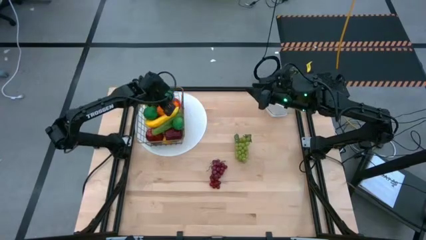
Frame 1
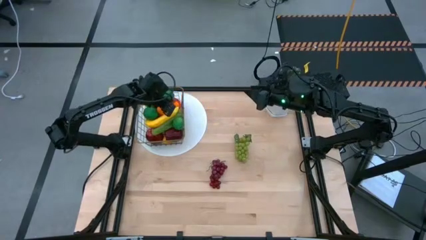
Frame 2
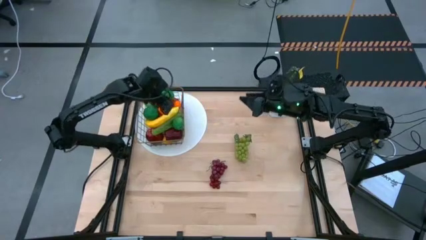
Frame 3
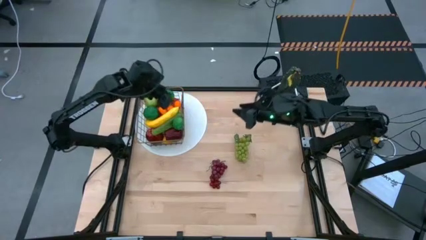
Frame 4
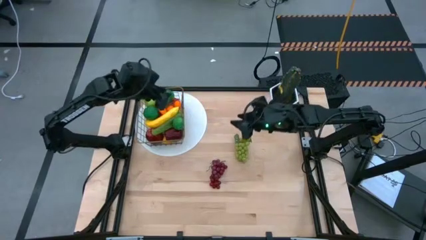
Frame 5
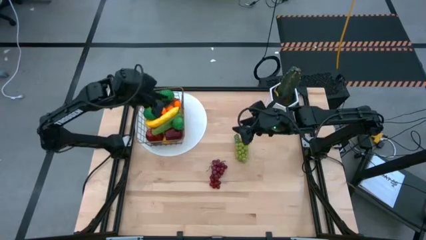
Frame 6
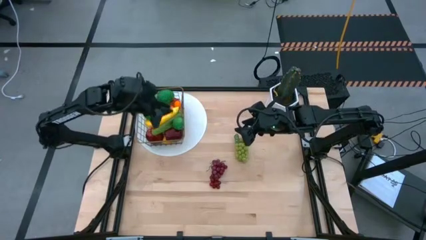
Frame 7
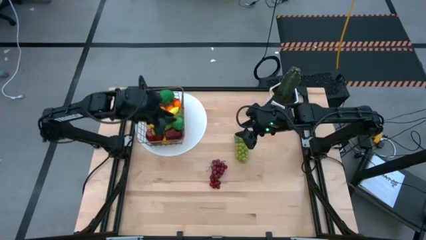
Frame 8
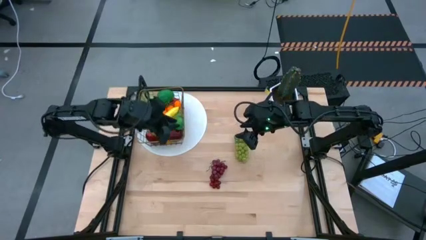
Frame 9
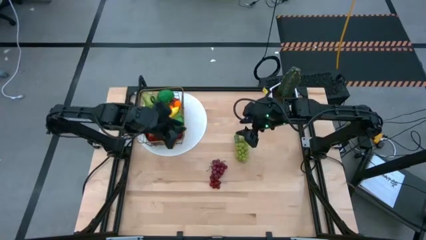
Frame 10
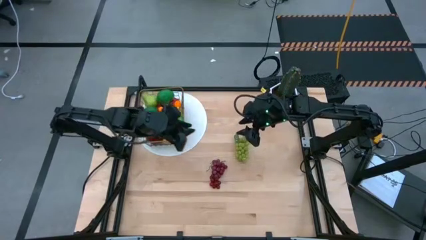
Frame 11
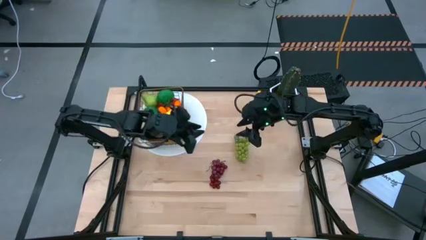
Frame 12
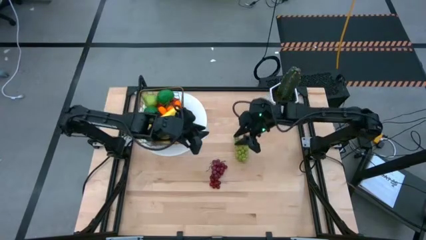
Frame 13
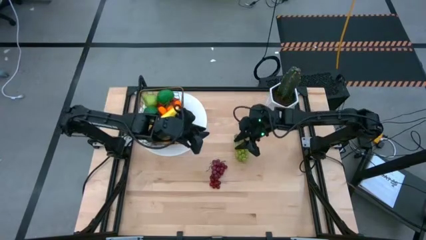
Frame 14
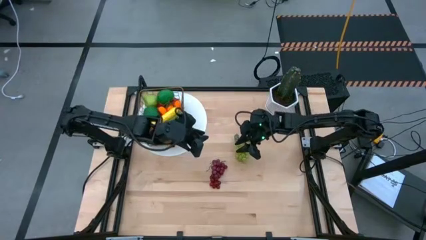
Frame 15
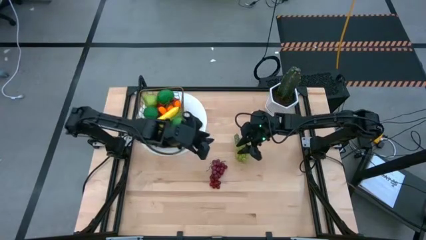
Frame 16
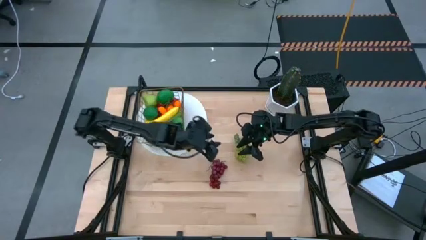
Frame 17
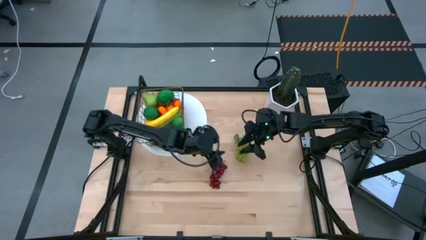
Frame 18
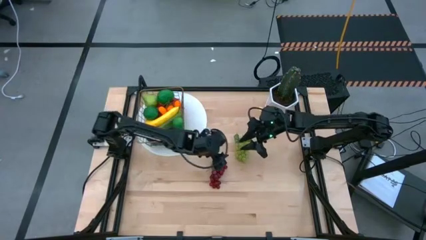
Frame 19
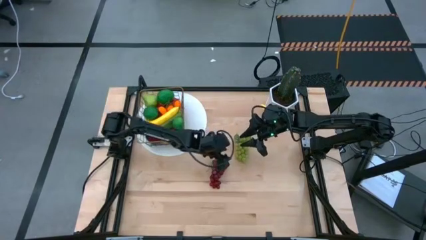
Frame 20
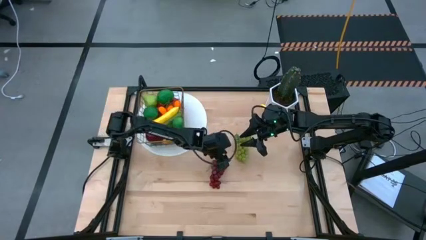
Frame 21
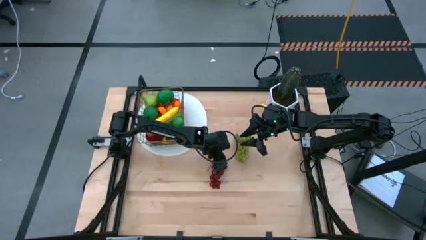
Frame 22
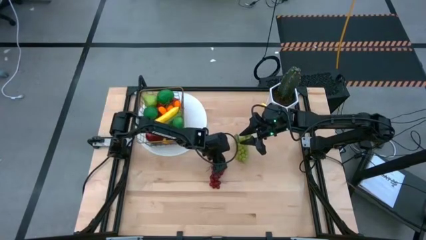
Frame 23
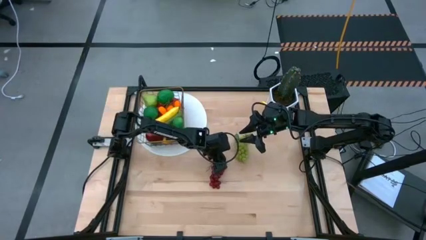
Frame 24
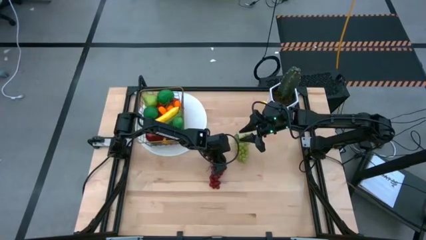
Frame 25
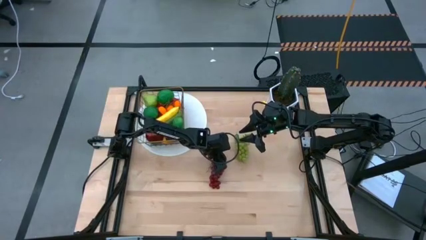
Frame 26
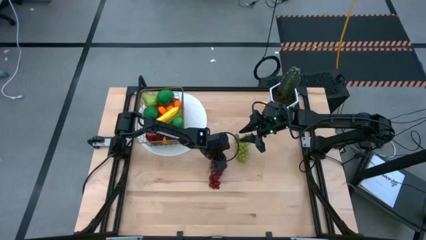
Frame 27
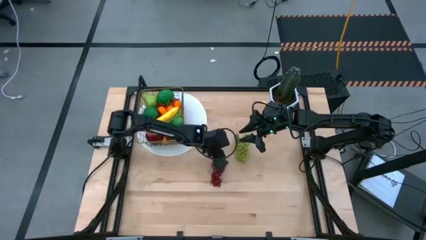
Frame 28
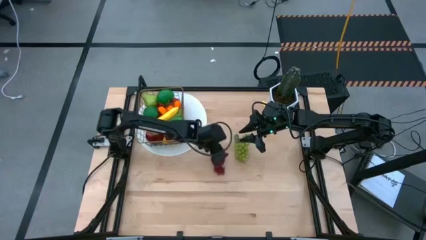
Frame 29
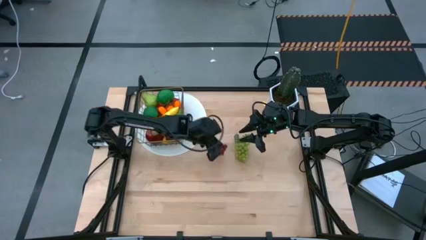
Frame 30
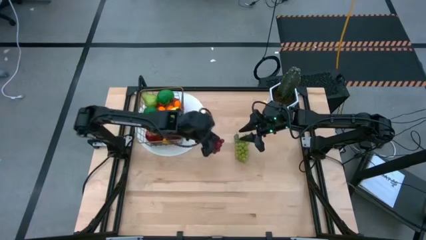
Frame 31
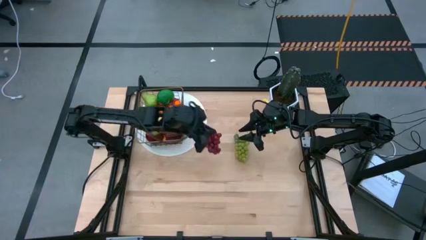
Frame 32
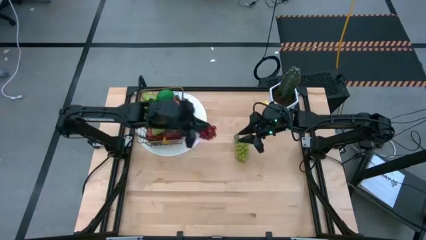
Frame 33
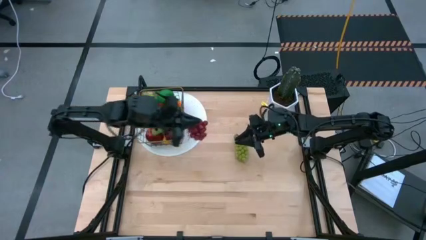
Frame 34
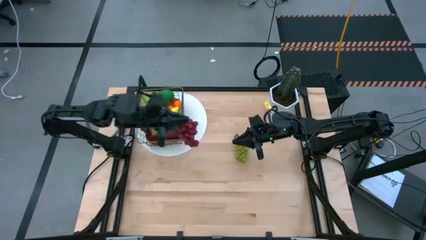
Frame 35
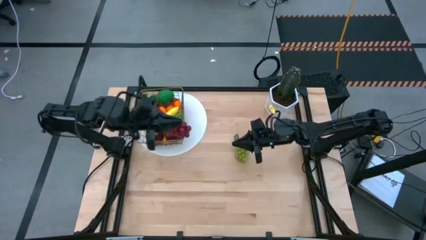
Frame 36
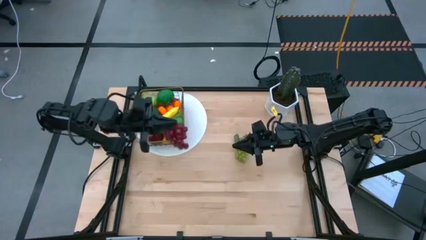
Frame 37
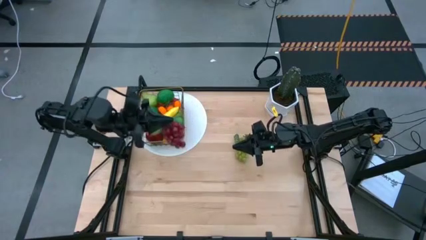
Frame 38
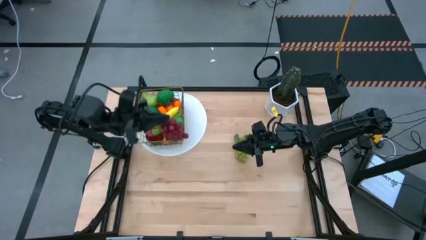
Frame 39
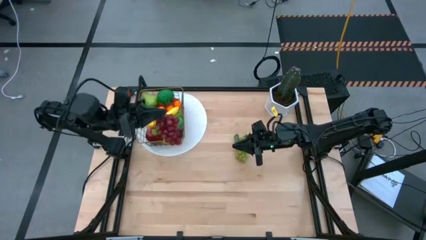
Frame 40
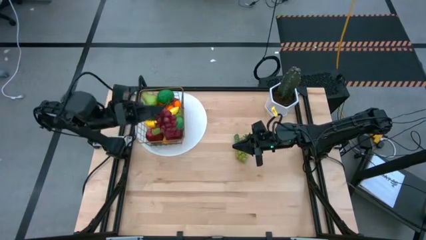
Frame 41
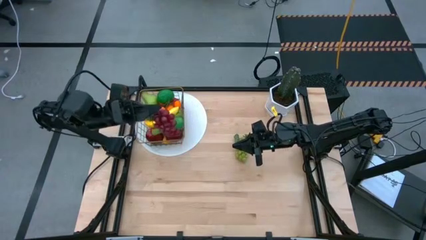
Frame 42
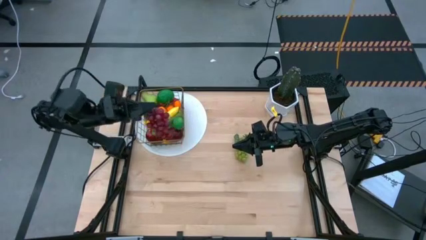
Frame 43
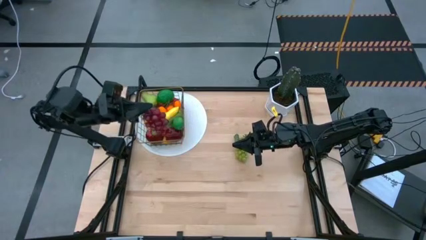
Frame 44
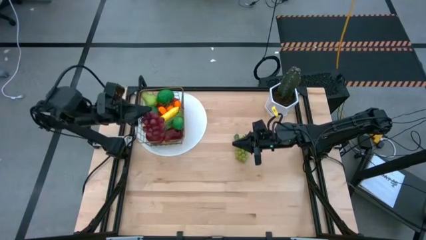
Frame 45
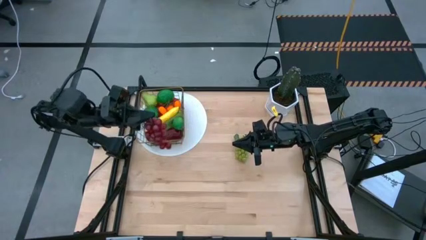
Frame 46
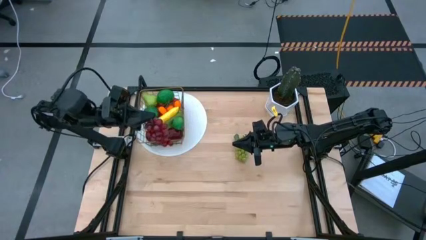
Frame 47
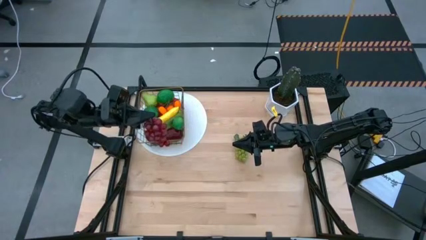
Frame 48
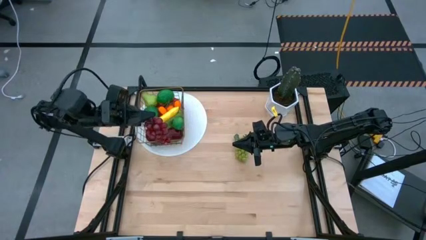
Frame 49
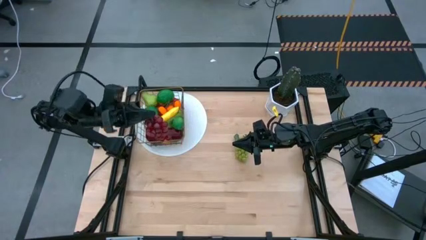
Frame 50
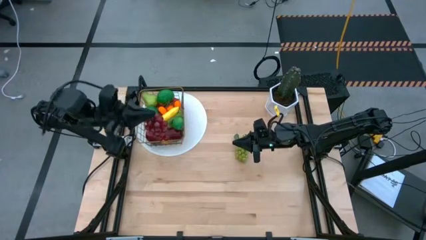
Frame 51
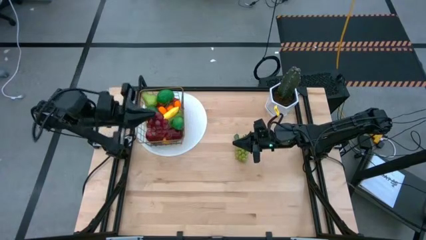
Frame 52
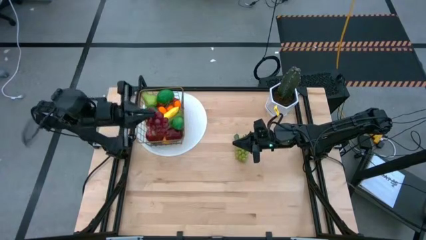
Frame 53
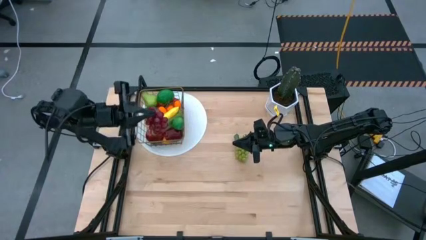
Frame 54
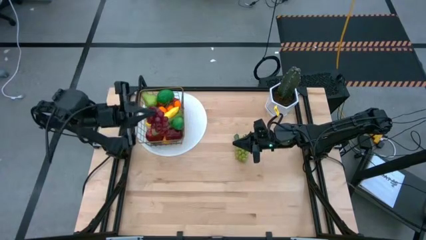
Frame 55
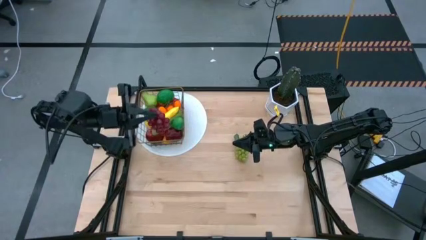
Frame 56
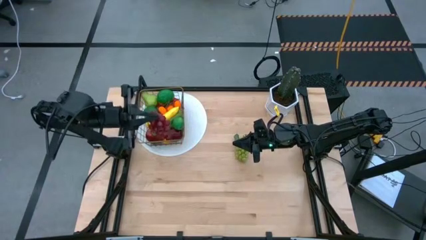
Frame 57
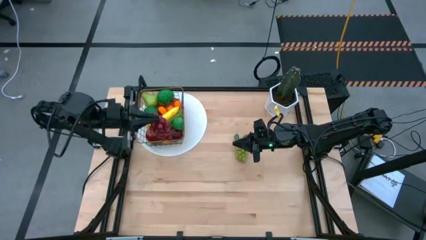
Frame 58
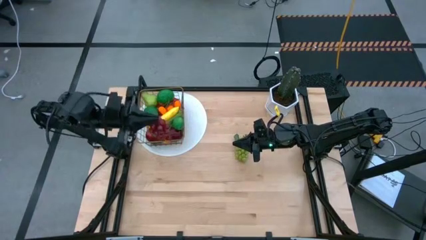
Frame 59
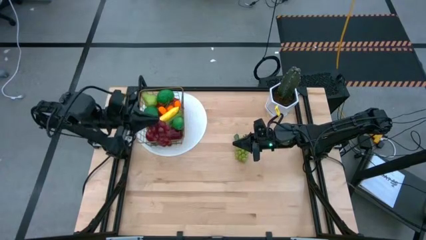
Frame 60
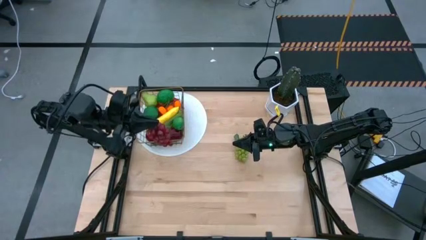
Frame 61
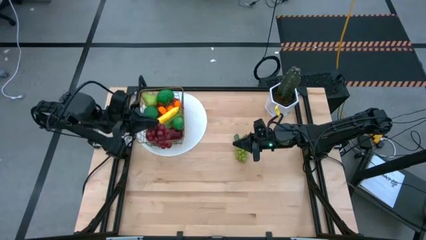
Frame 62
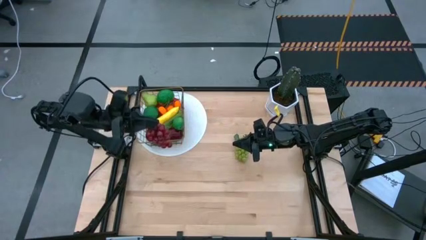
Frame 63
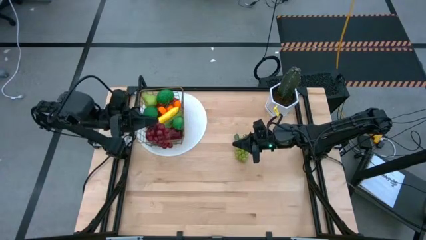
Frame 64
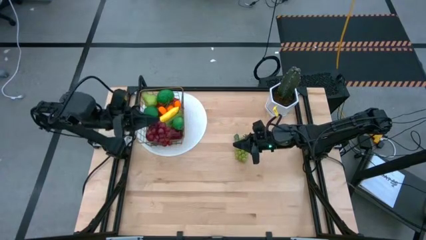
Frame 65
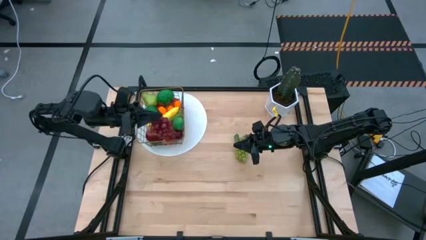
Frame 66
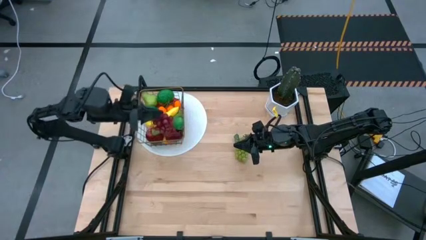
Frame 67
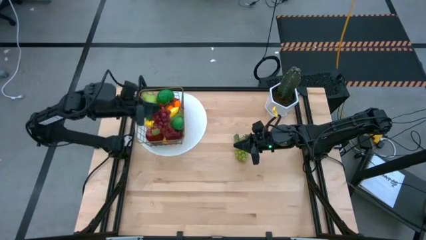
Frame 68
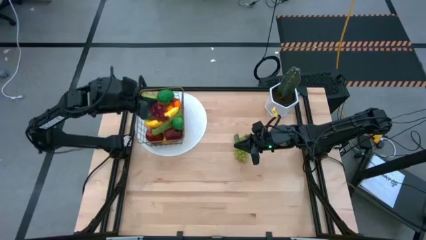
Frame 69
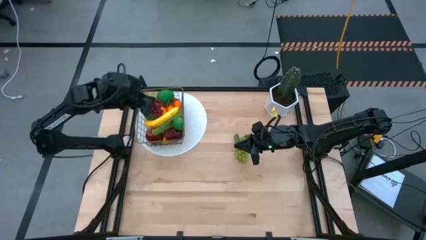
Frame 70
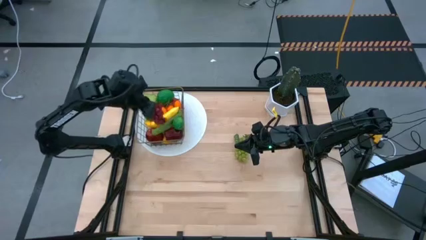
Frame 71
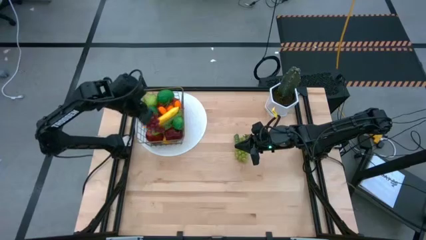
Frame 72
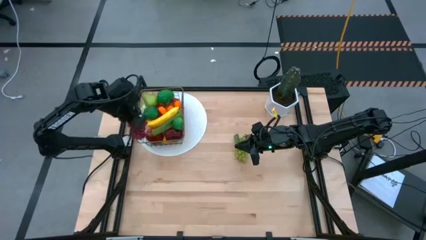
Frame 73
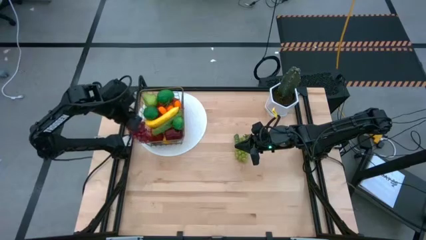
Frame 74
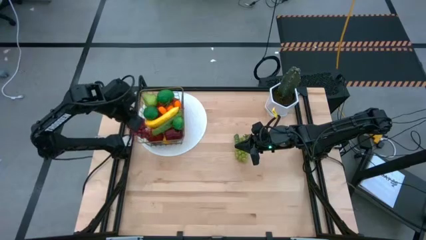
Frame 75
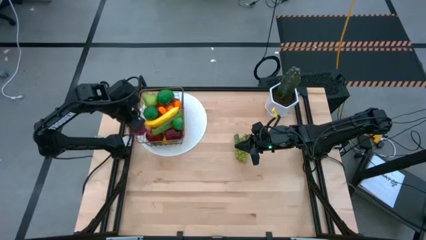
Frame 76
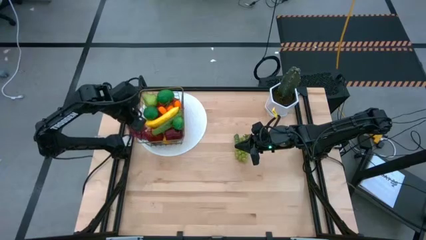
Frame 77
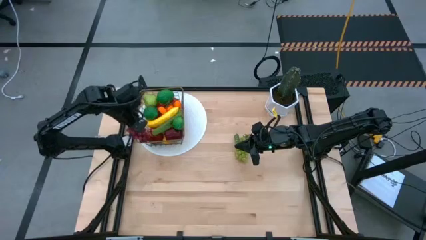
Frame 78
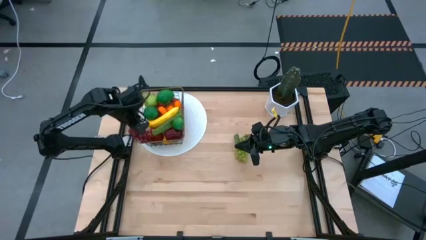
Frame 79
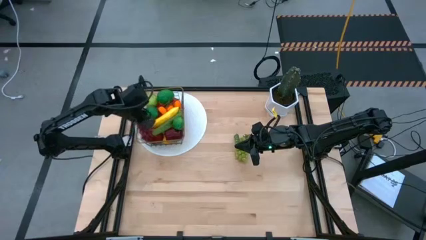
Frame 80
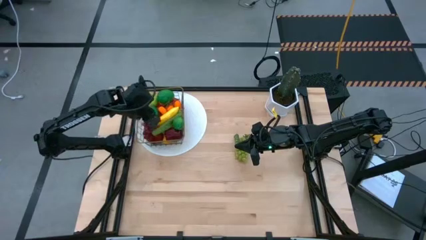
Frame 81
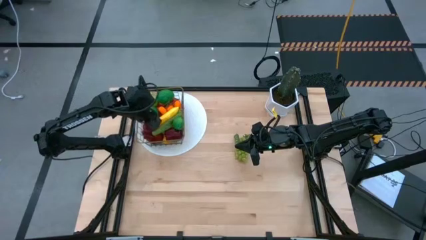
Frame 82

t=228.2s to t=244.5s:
Task: Build produce basket
Put the red grapes into the wire basket
